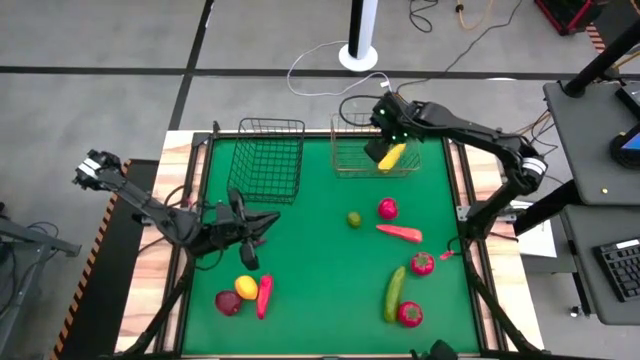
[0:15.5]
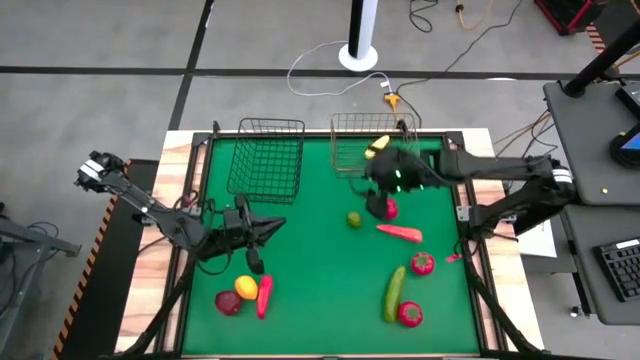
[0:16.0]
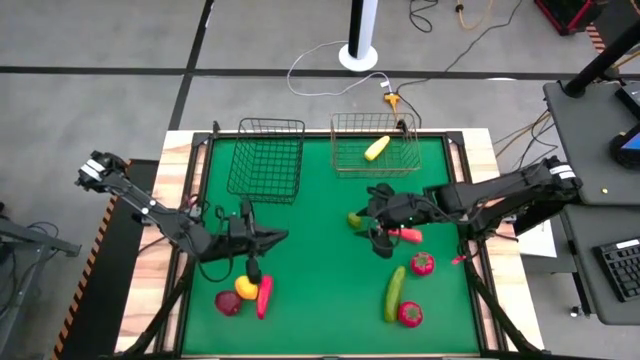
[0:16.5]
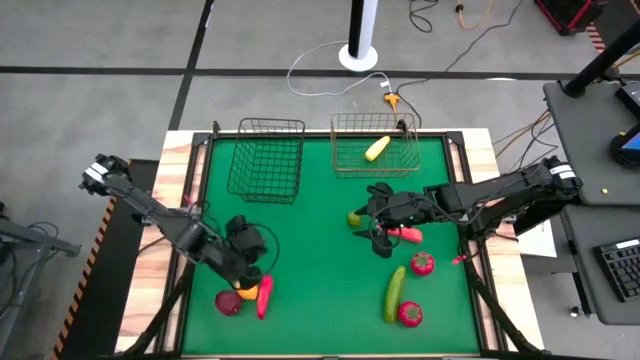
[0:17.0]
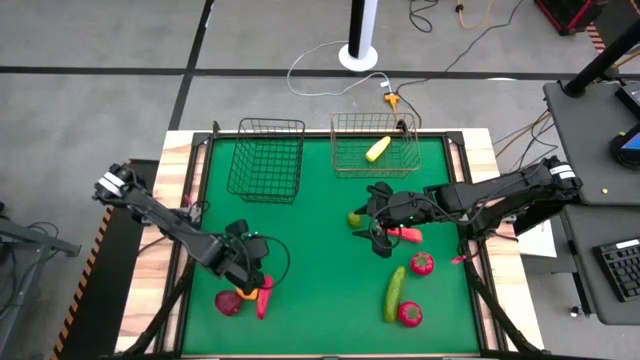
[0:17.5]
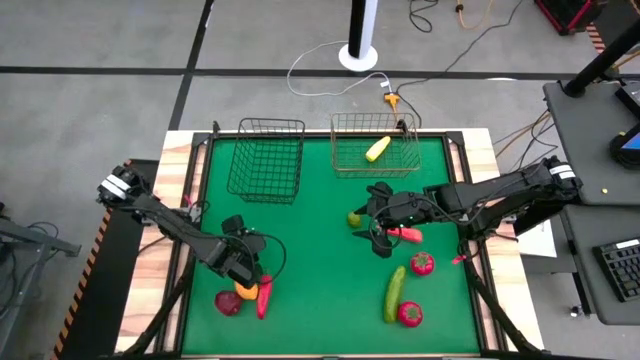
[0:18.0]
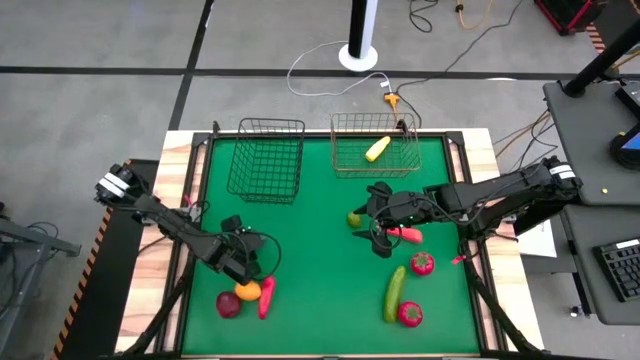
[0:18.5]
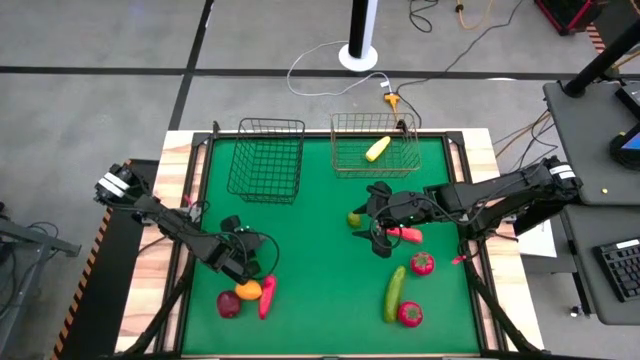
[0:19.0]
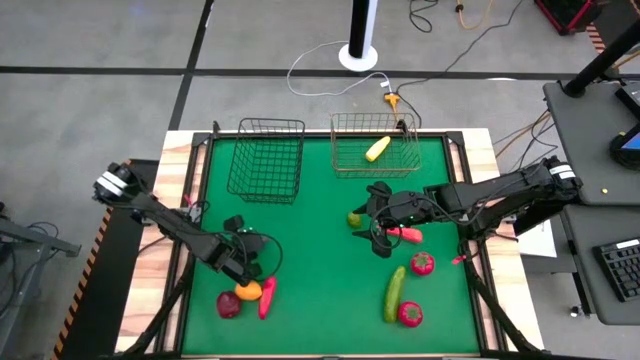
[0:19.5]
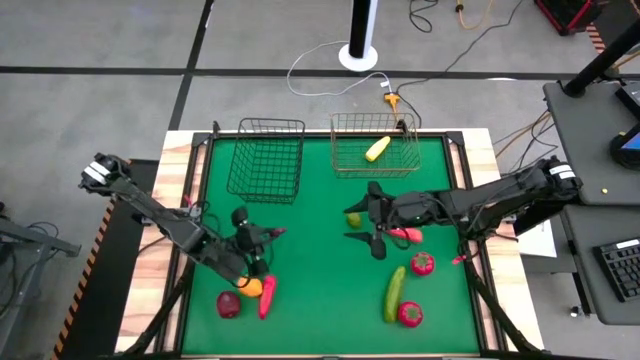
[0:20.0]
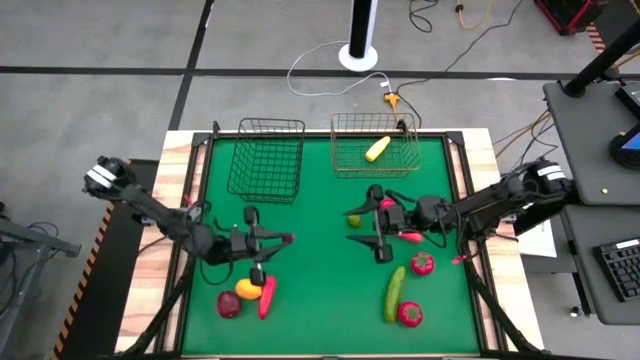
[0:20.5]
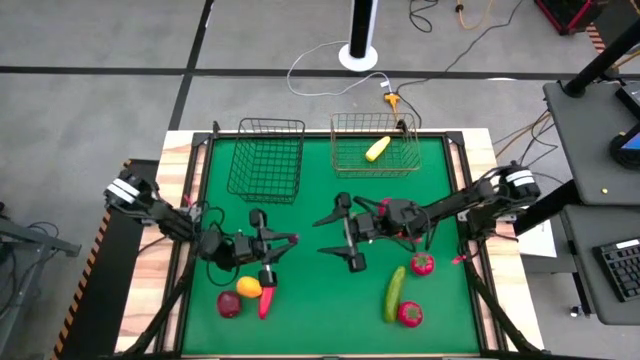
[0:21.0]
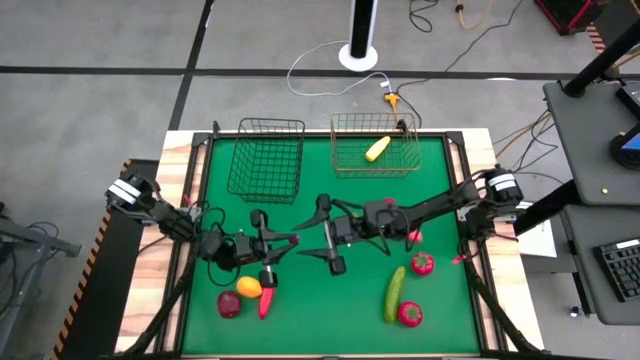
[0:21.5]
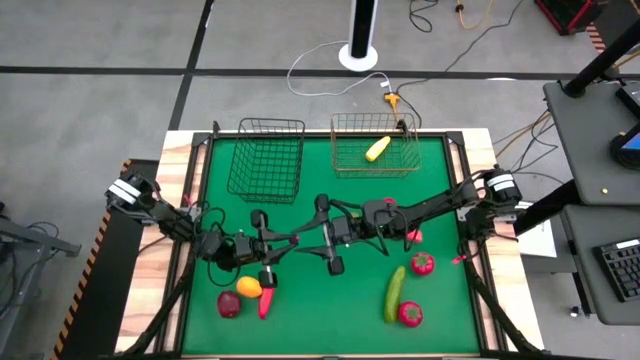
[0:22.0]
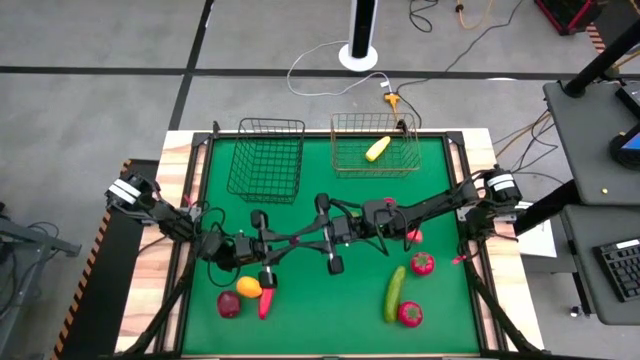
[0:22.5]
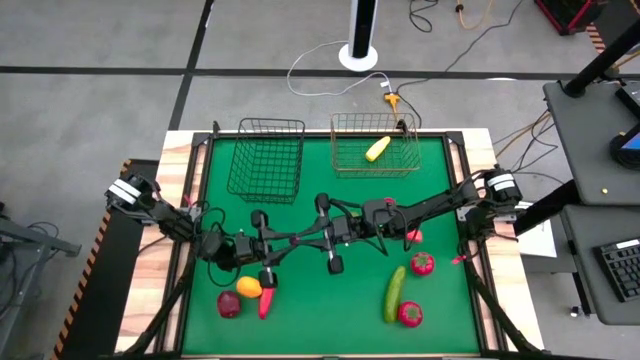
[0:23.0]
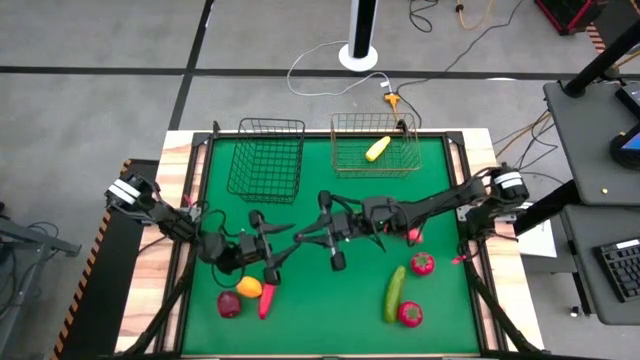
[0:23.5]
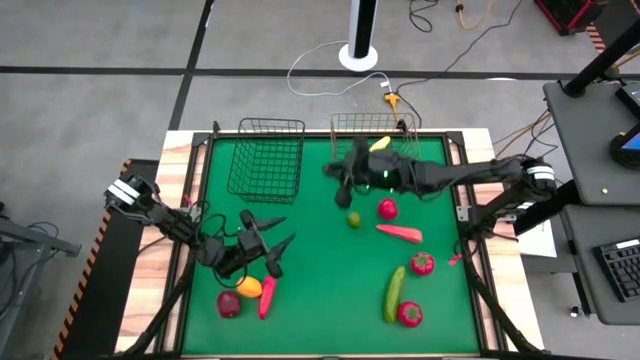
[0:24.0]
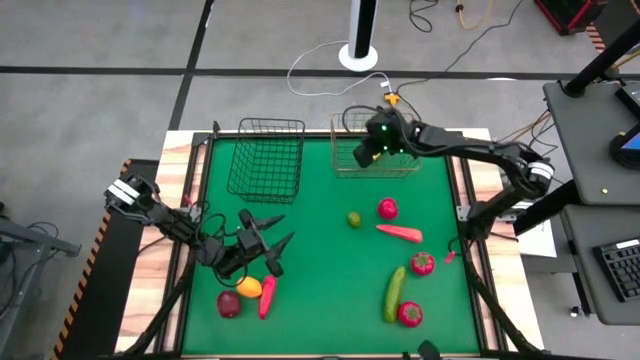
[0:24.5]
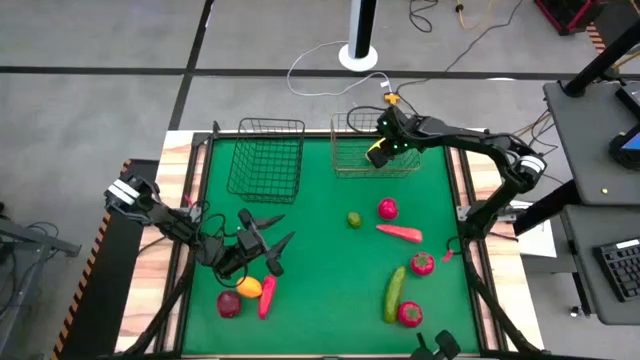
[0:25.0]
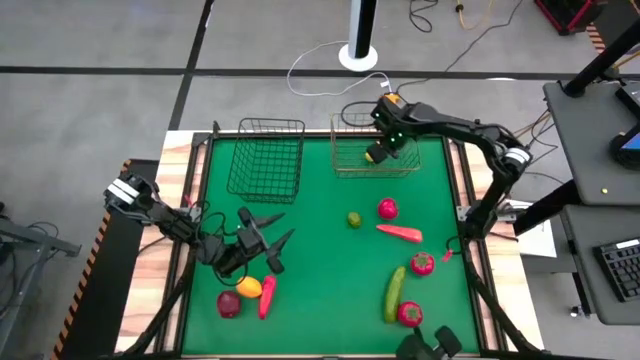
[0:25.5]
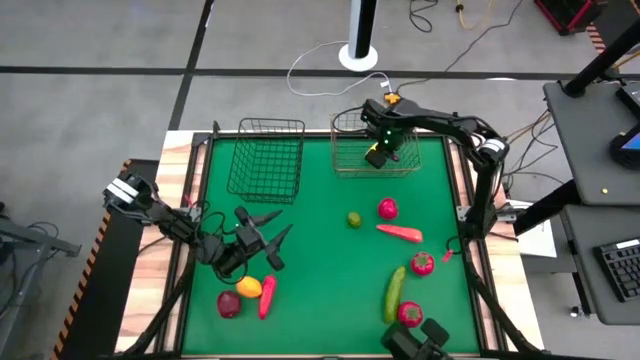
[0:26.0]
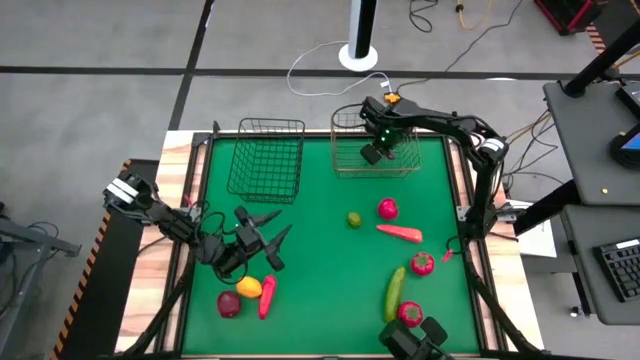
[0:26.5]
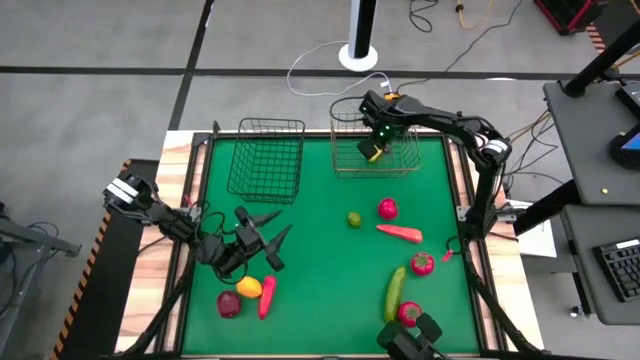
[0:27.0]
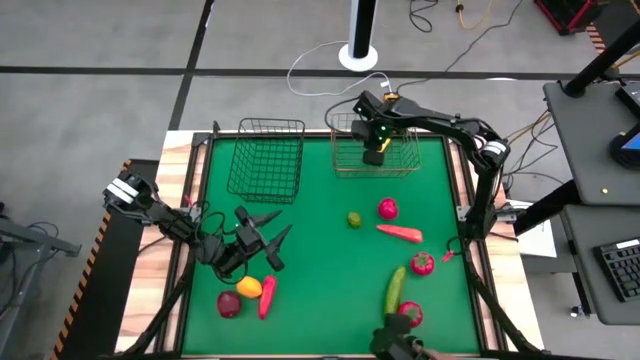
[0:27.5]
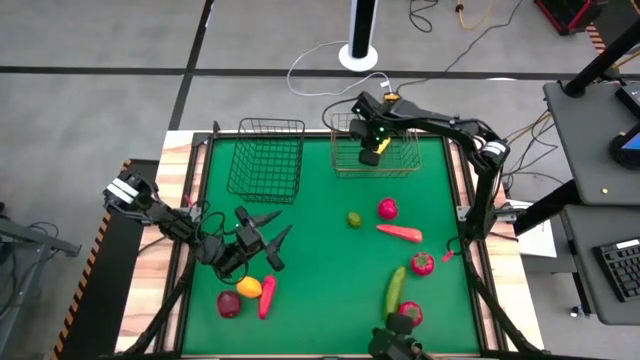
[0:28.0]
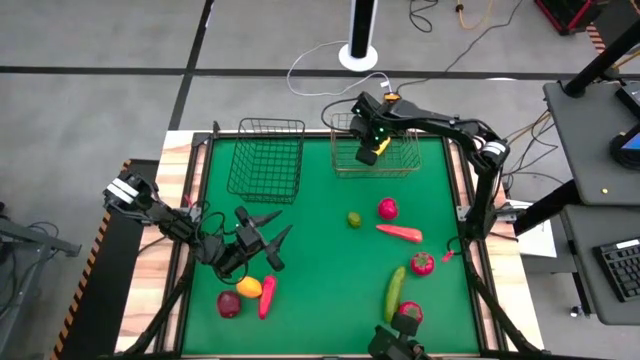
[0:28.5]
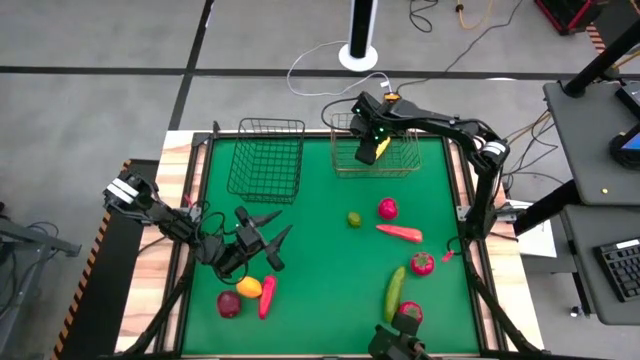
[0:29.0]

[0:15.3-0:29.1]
Task: Sort produce into baskets
Put the eggplant into the gold wire basket

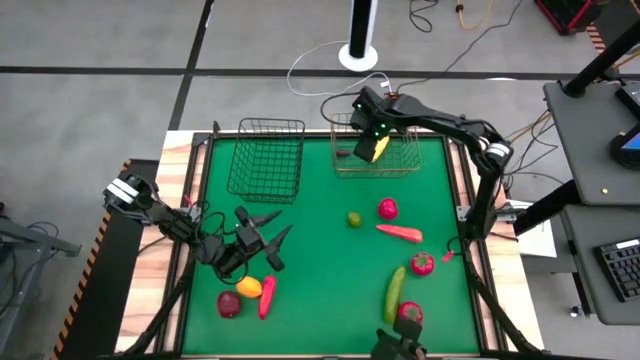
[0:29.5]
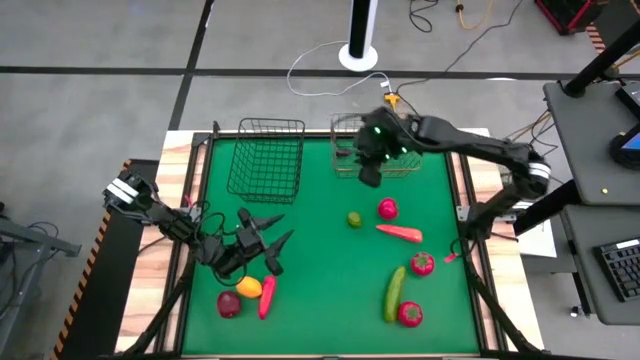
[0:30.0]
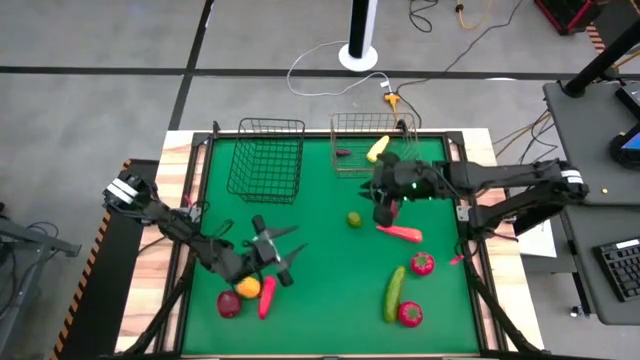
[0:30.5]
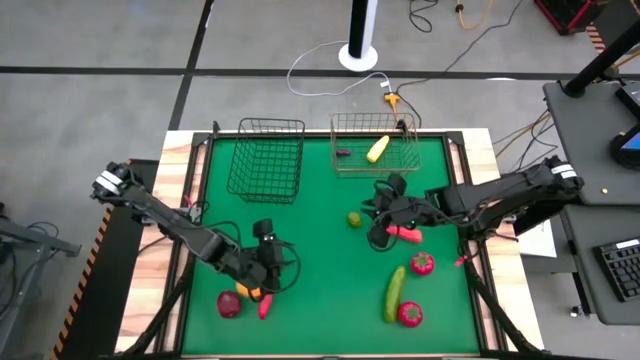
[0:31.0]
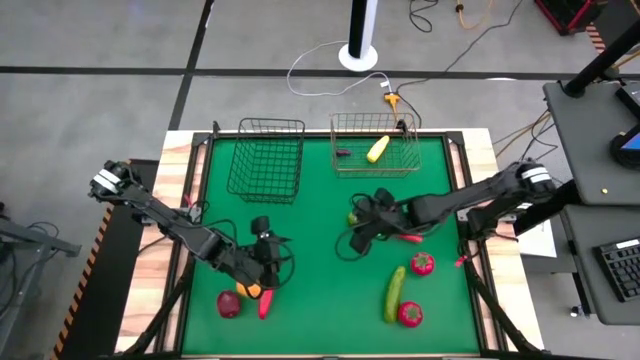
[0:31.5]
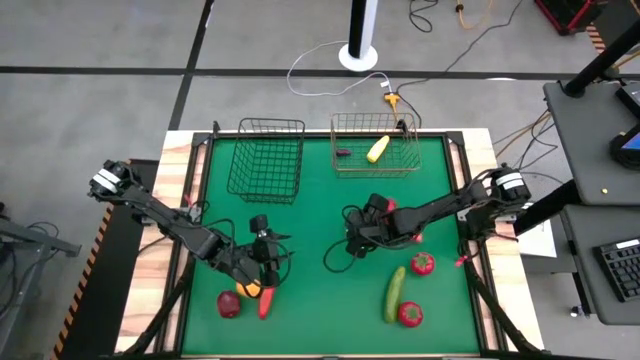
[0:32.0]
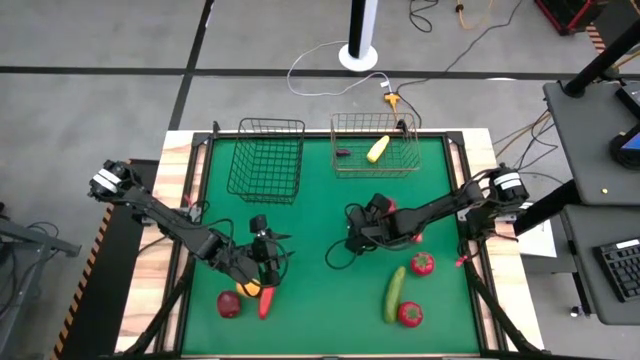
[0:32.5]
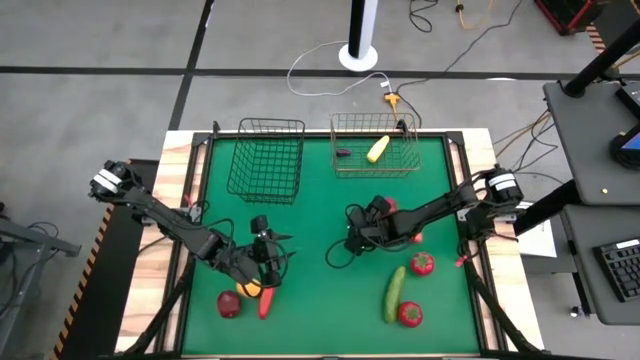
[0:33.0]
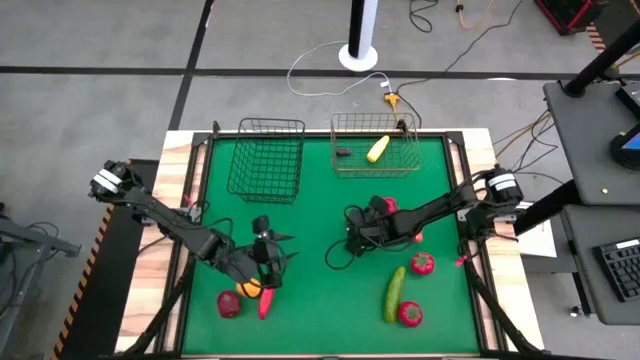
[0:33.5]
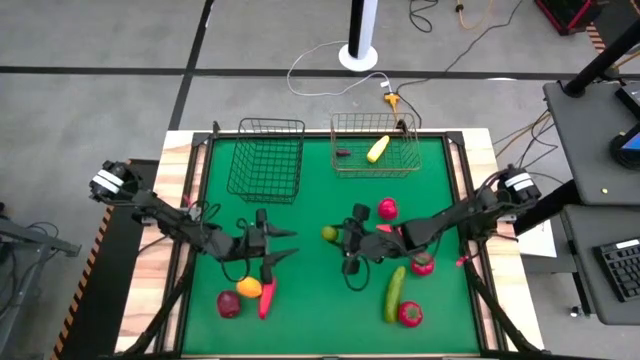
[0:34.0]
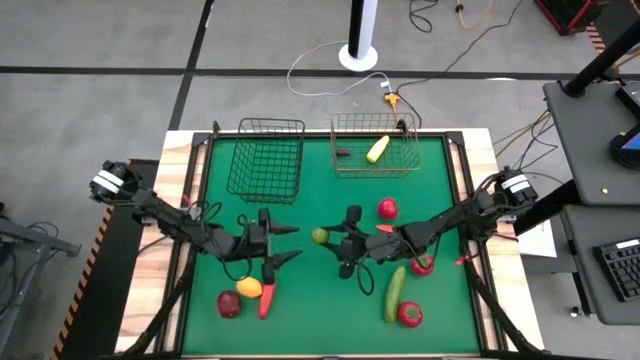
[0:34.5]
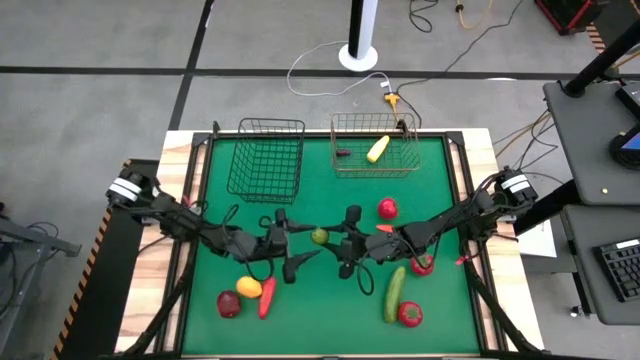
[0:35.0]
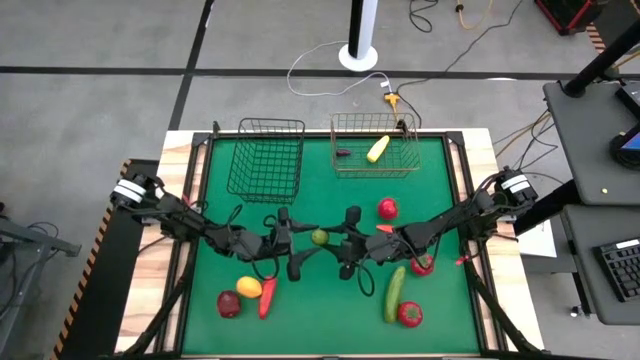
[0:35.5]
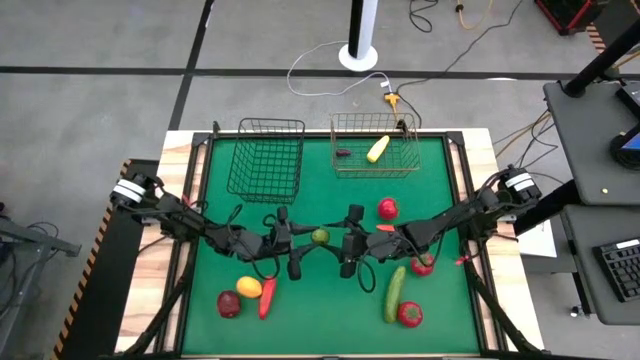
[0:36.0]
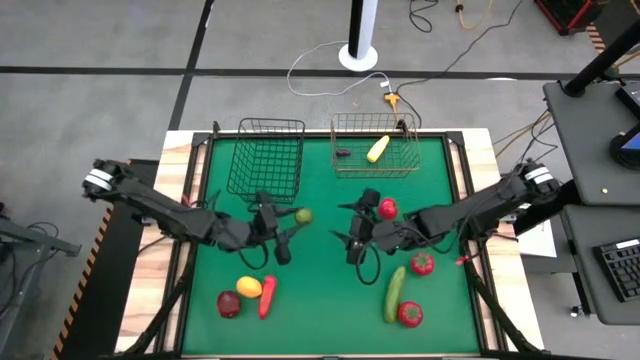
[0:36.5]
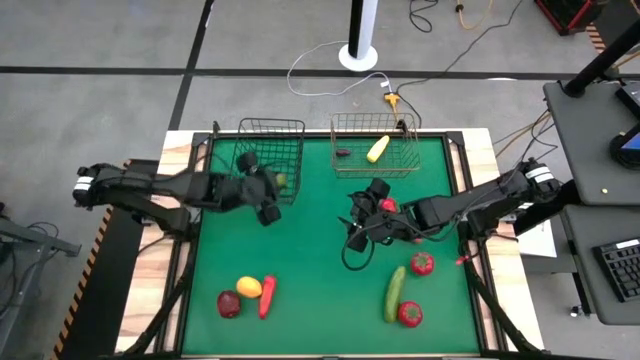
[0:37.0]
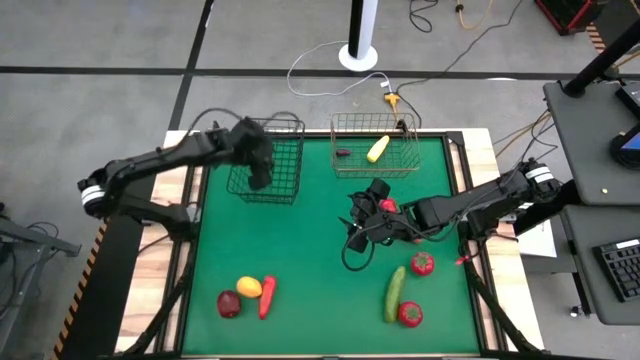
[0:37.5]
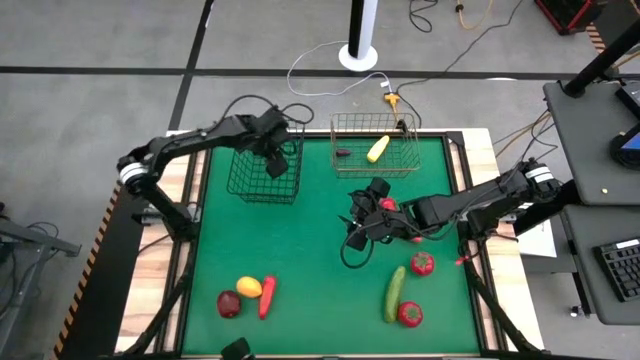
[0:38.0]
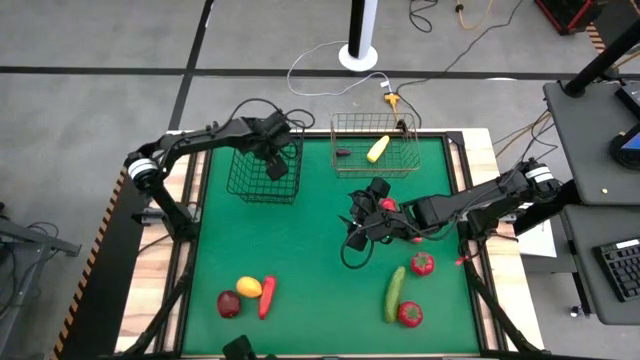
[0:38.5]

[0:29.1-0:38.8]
Put the lime into the black wire basket
